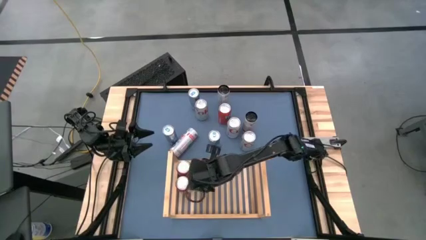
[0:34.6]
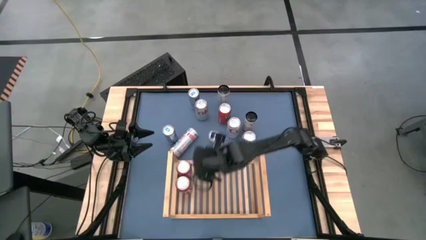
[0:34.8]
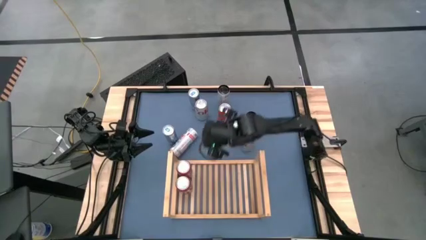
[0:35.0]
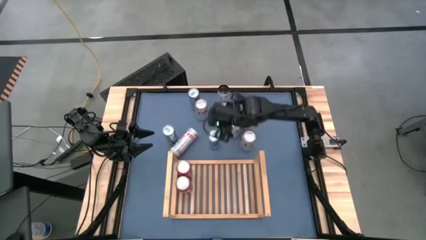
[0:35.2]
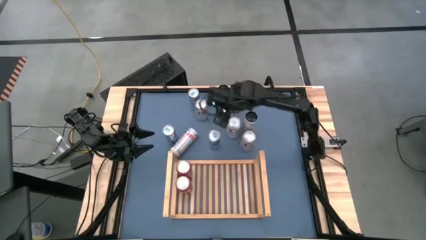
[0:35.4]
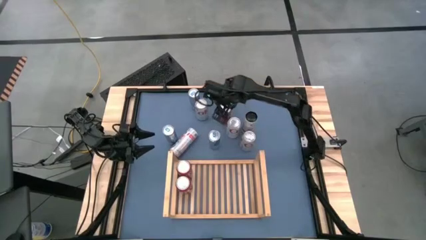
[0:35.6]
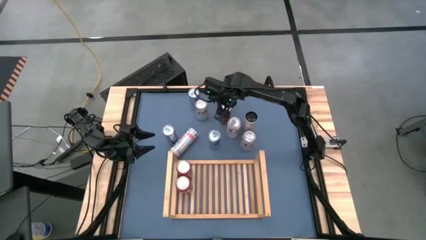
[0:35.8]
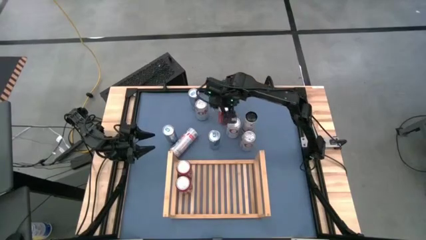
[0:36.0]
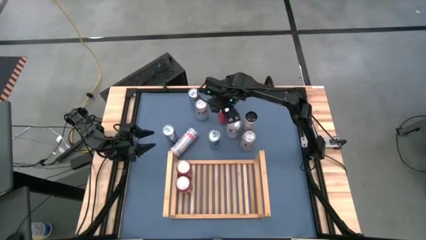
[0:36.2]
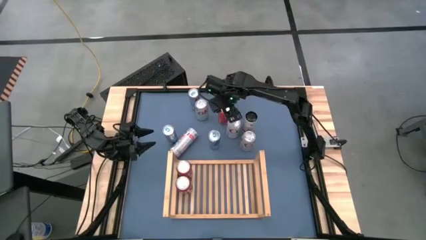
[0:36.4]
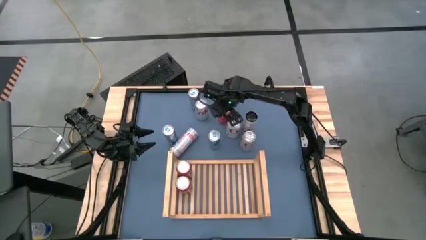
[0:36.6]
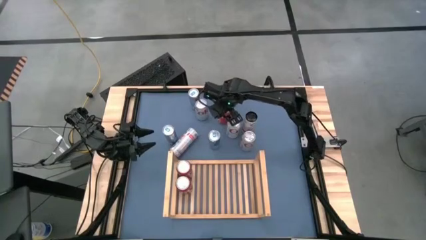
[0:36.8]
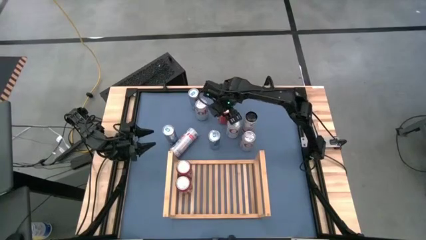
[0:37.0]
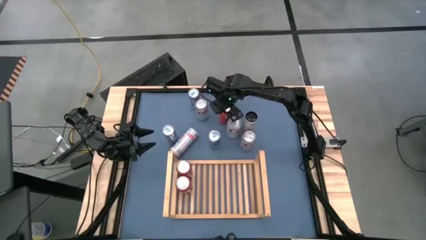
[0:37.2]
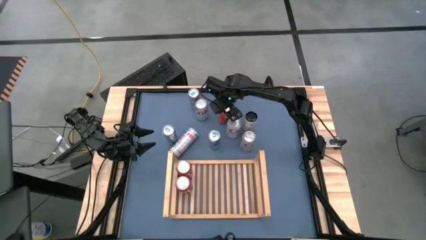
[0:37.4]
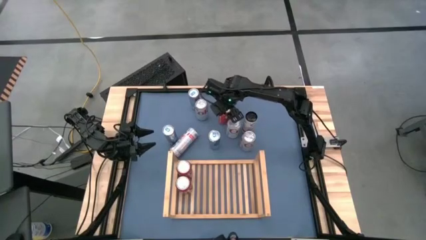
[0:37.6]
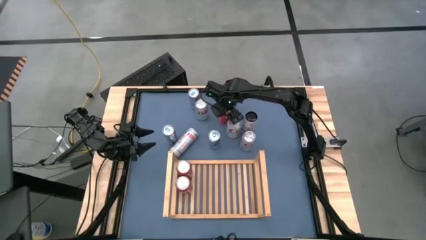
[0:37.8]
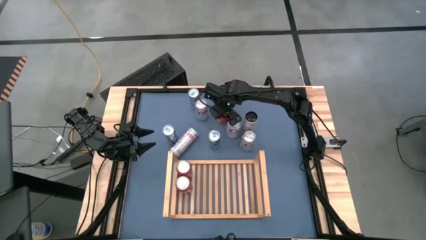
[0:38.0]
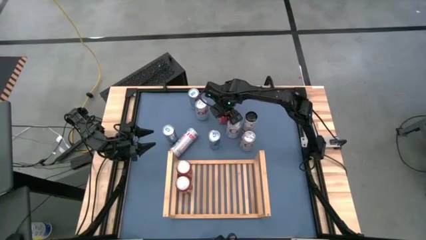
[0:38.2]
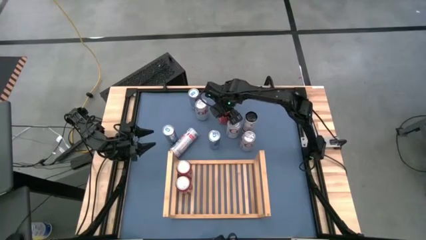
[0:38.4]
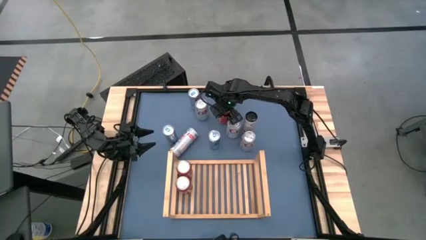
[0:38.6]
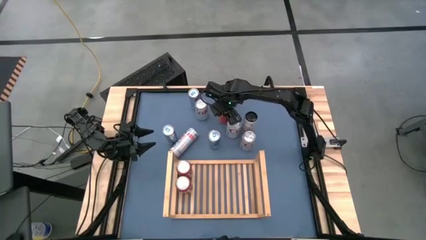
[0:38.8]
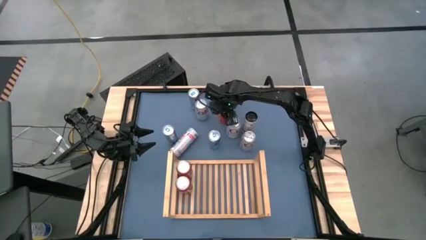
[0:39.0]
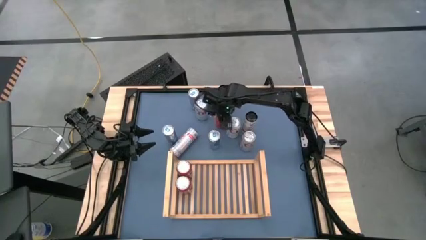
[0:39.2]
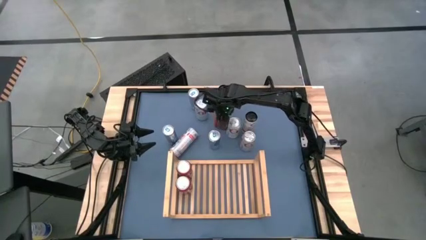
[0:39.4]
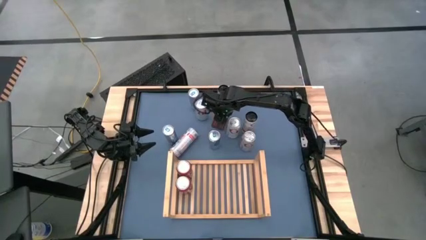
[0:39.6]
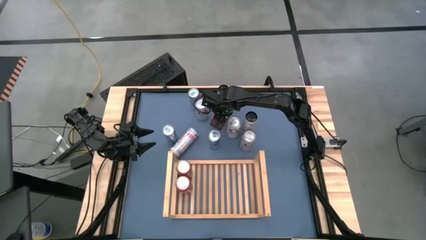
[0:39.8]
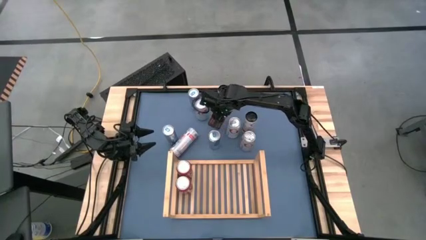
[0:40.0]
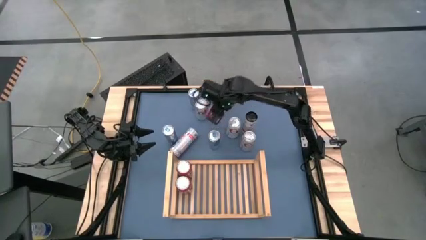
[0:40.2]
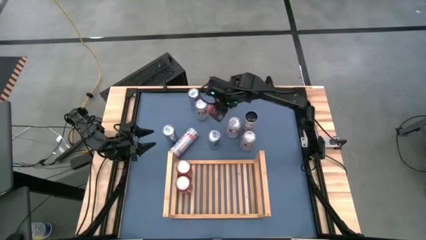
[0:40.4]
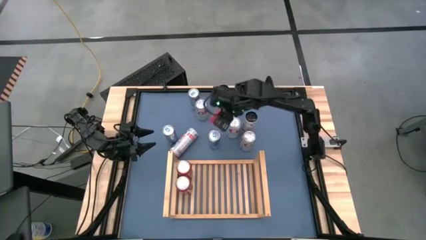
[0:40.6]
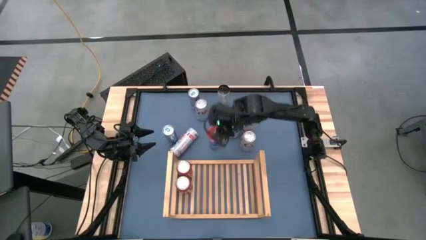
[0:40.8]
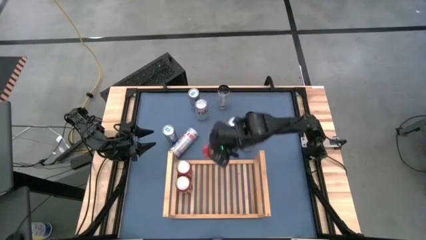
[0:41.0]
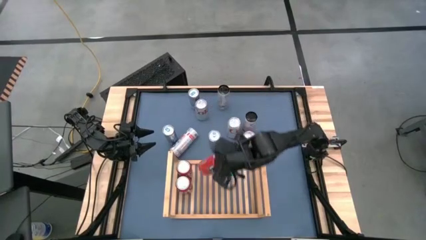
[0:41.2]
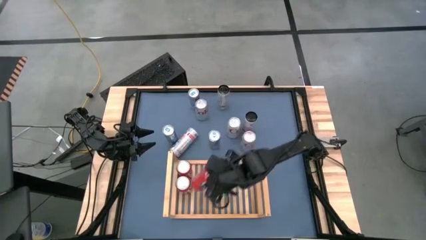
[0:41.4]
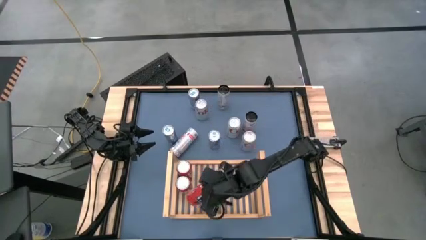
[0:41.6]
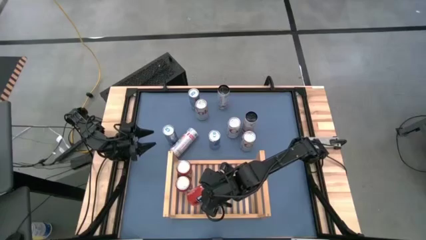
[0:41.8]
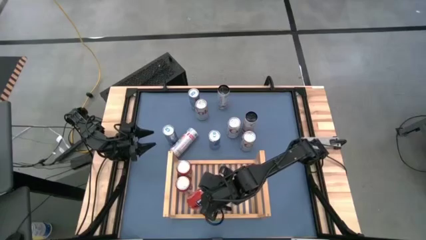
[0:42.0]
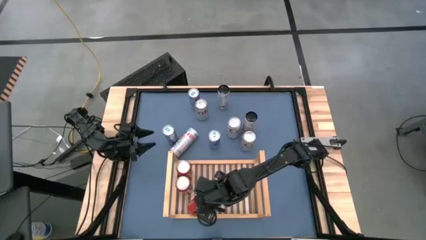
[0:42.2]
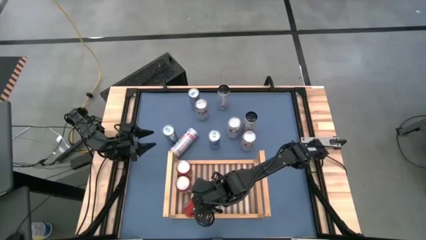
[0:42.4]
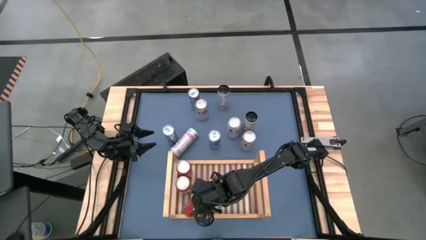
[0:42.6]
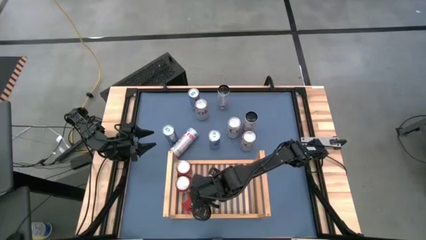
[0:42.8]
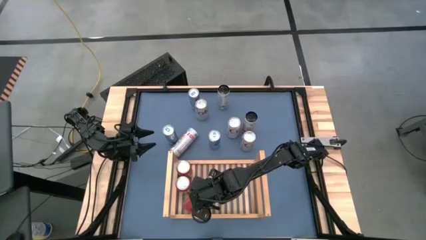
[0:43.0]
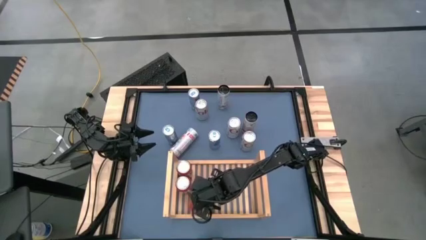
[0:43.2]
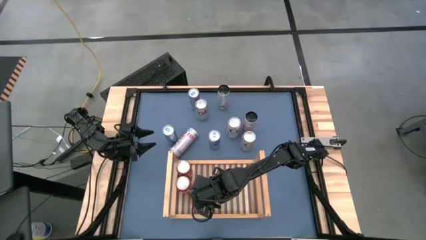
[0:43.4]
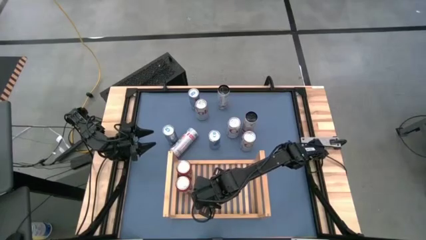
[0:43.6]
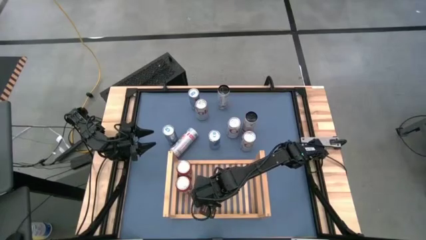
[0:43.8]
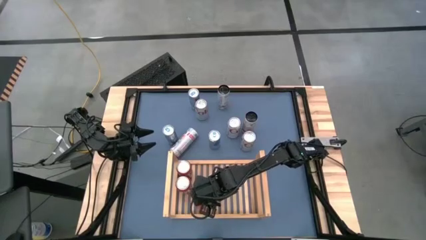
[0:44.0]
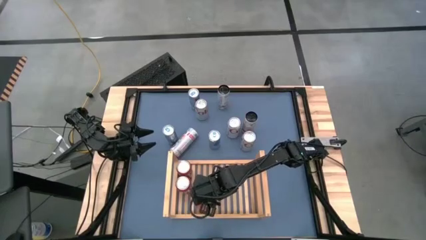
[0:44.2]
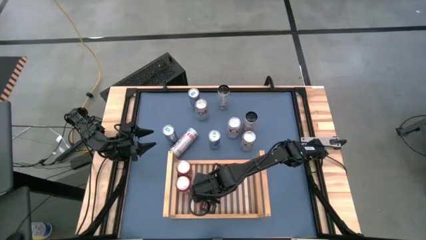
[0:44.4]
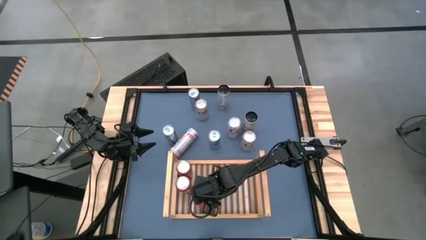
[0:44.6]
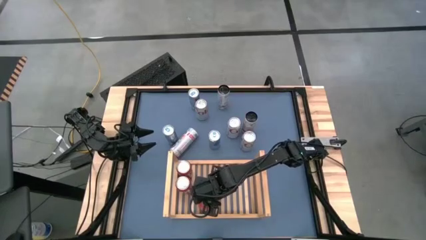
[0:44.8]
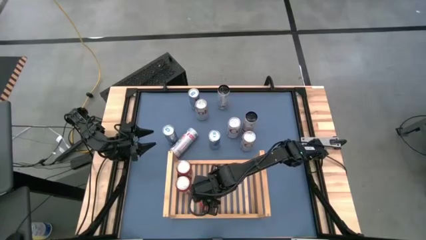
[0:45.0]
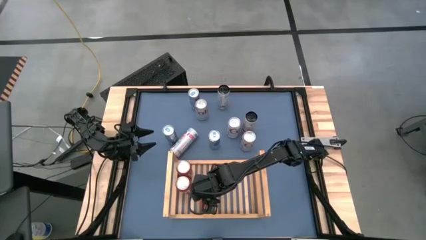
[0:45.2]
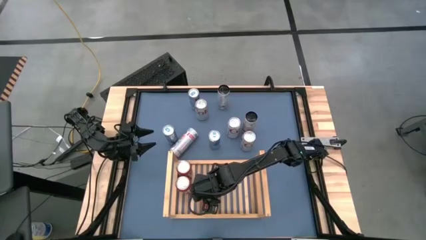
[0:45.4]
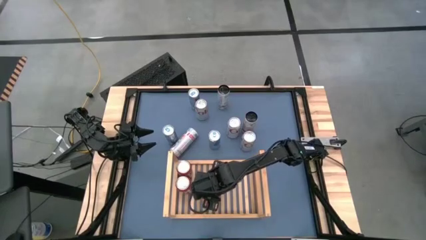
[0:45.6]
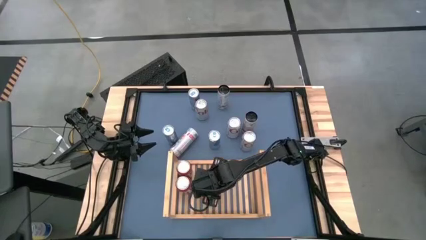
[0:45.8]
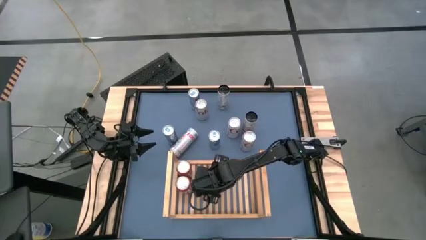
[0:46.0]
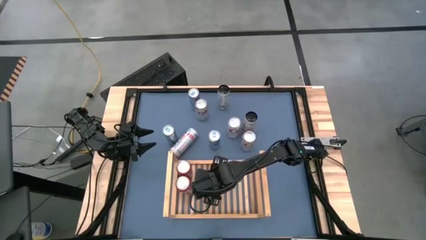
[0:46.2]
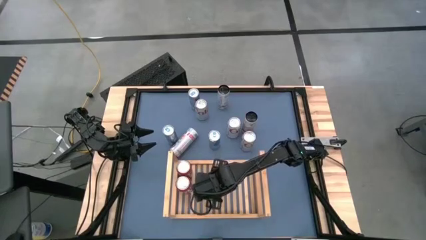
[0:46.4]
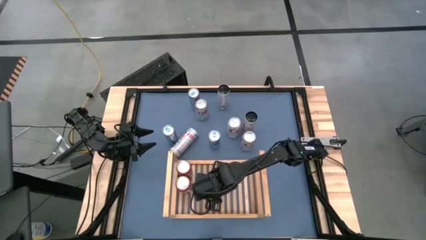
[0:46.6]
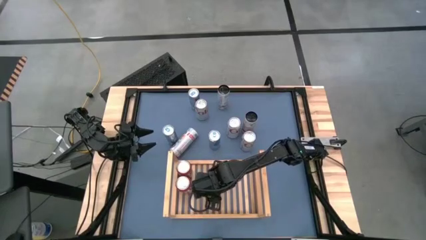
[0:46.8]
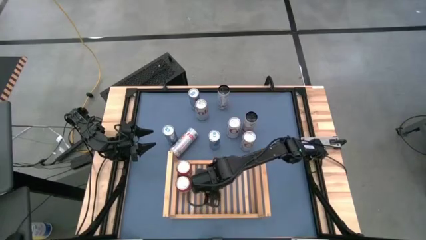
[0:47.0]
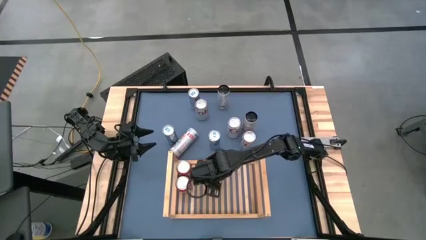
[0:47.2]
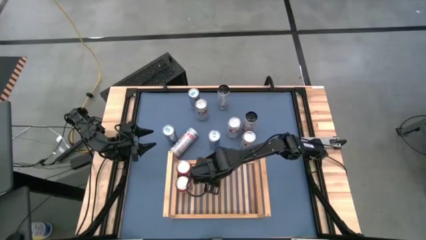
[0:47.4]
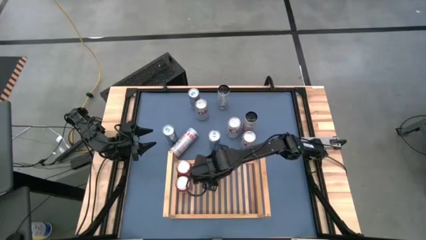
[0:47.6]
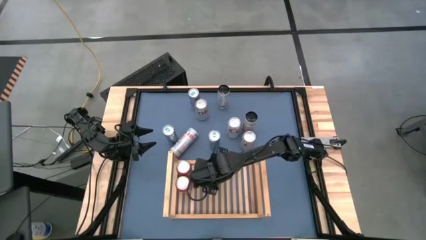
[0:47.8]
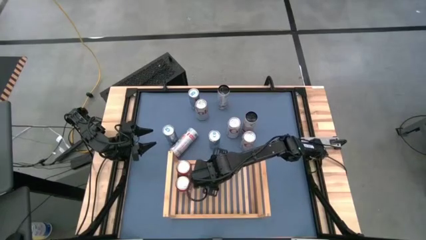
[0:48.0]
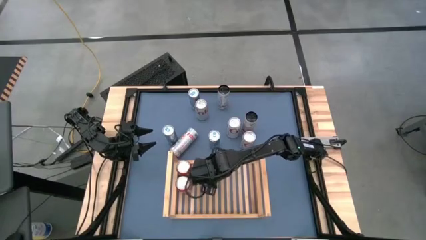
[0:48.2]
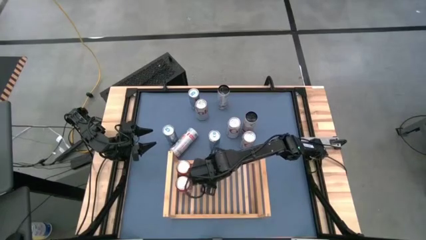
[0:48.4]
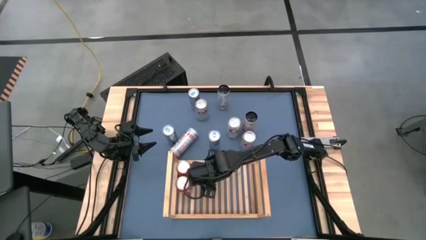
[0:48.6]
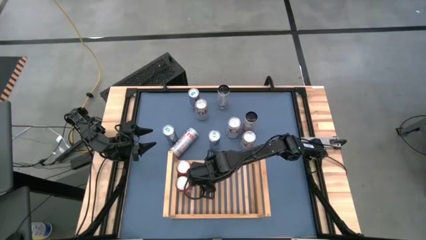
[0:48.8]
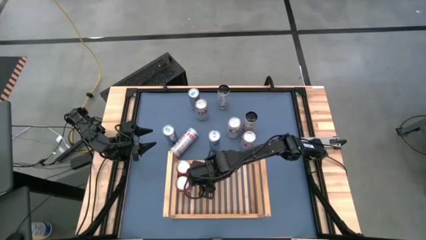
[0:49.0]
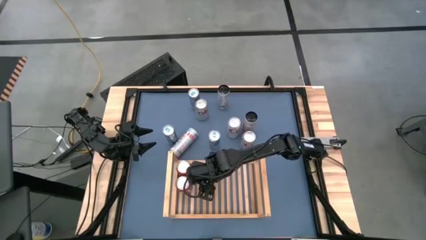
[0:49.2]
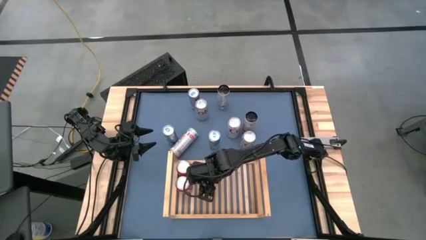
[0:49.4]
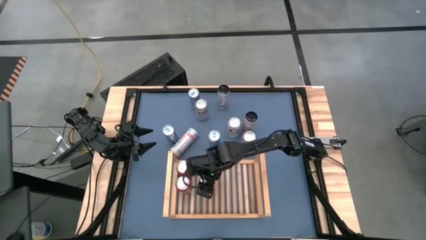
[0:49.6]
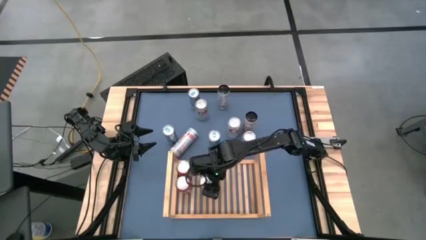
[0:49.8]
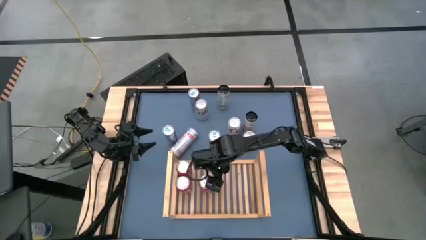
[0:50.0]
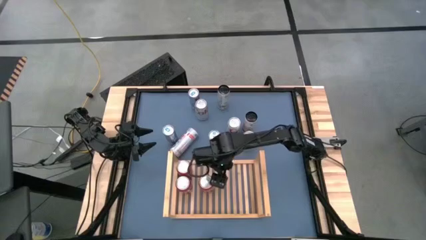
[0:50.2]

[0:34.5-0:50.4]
Task: Place canned beverage on shelf
Put the red soda can on the shelf aligned with the other red soda can
